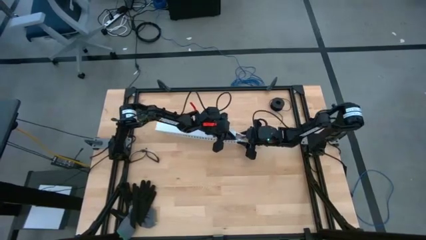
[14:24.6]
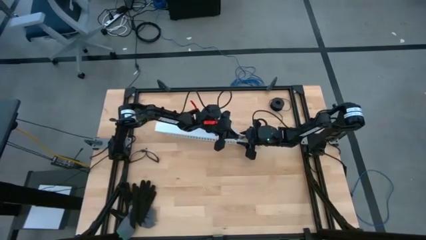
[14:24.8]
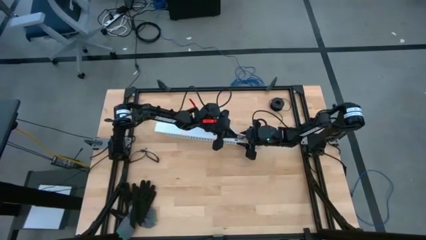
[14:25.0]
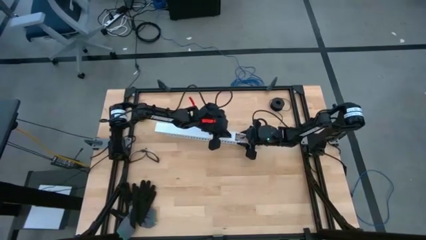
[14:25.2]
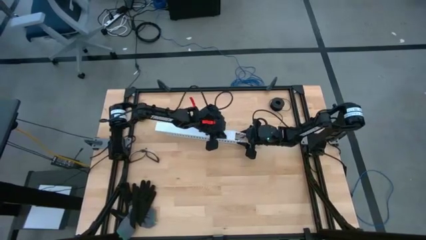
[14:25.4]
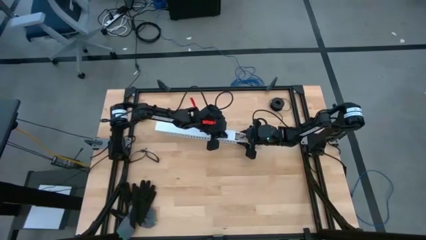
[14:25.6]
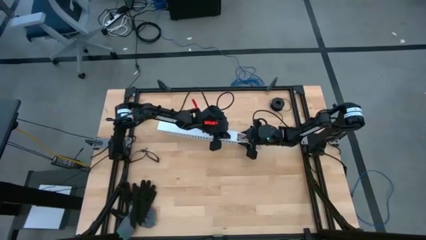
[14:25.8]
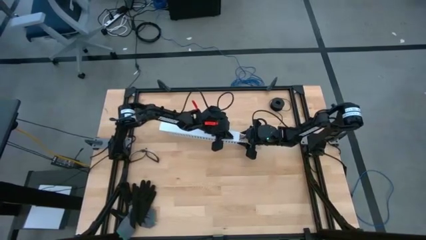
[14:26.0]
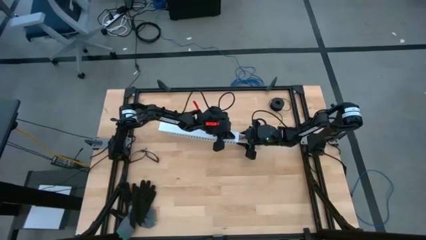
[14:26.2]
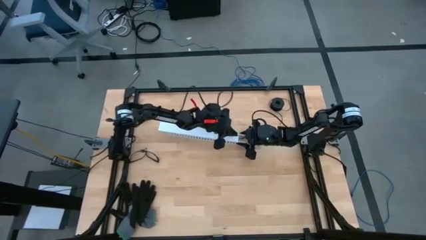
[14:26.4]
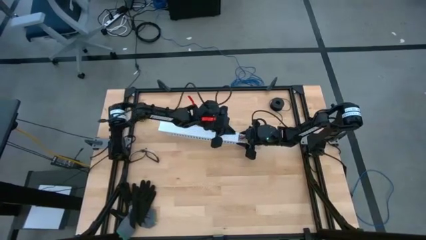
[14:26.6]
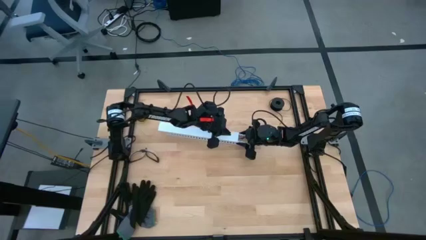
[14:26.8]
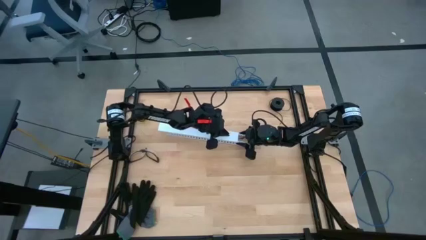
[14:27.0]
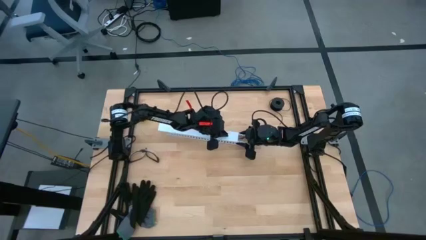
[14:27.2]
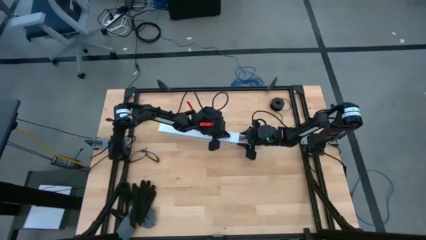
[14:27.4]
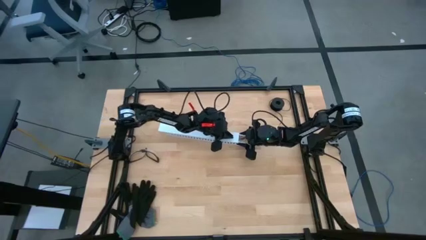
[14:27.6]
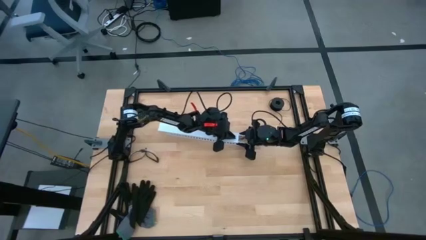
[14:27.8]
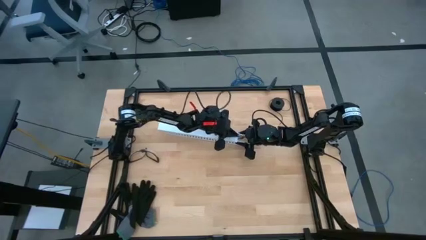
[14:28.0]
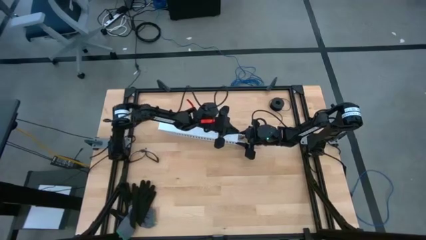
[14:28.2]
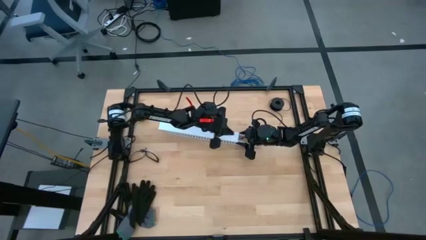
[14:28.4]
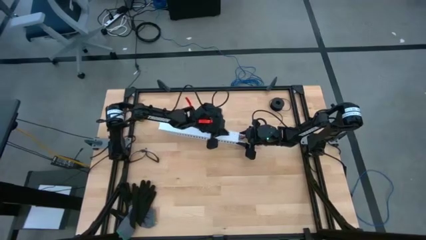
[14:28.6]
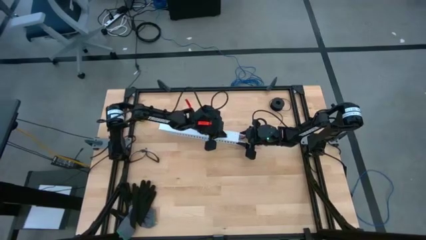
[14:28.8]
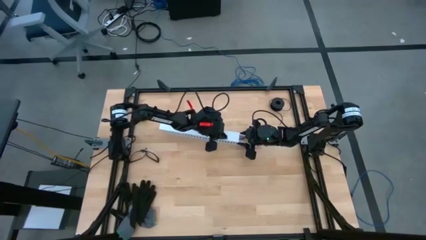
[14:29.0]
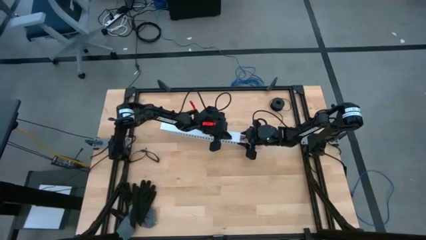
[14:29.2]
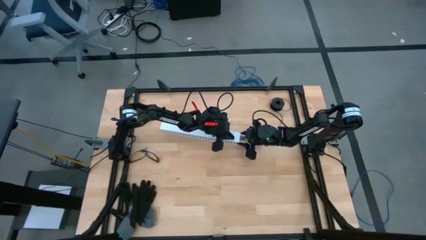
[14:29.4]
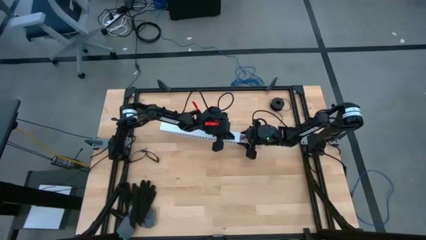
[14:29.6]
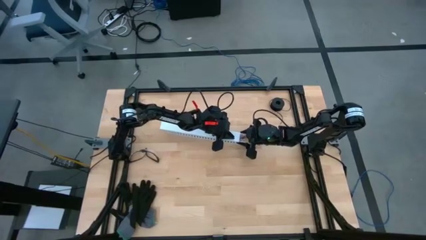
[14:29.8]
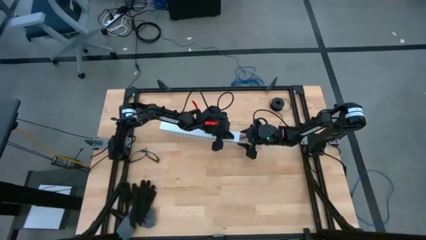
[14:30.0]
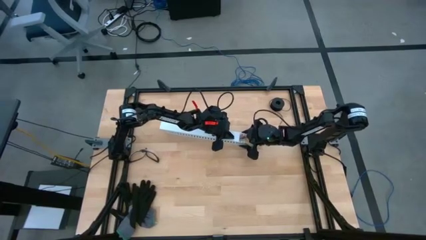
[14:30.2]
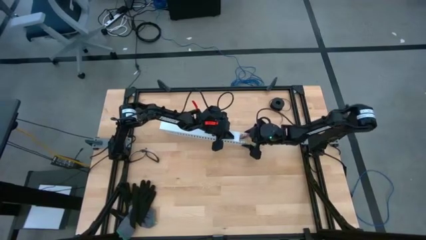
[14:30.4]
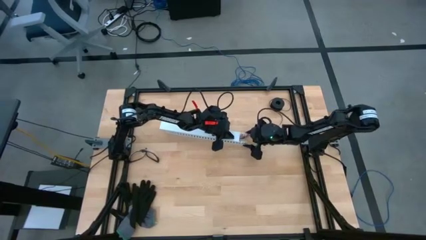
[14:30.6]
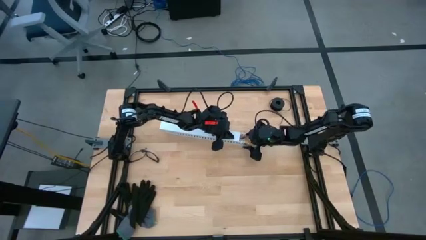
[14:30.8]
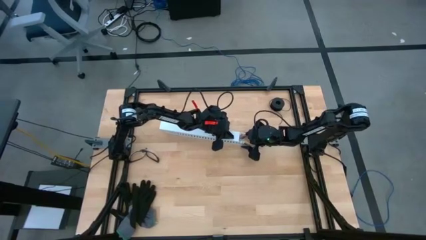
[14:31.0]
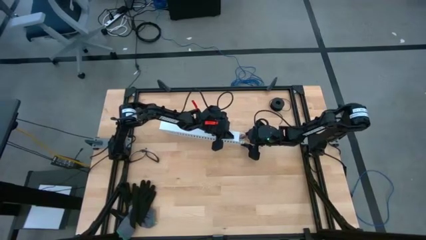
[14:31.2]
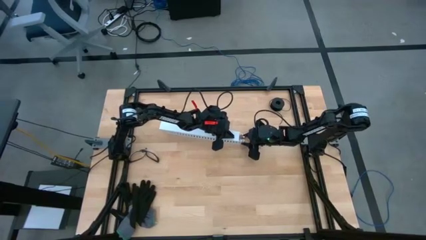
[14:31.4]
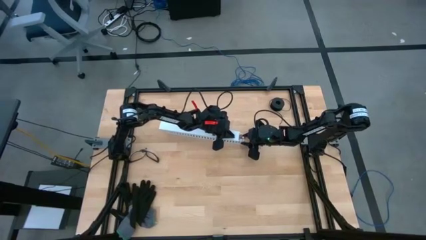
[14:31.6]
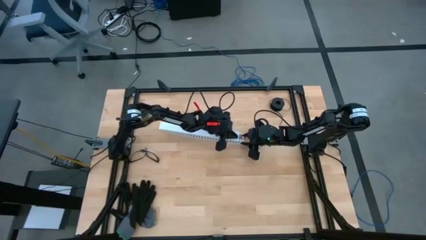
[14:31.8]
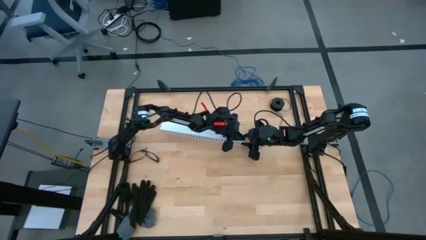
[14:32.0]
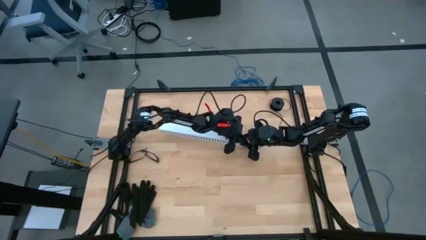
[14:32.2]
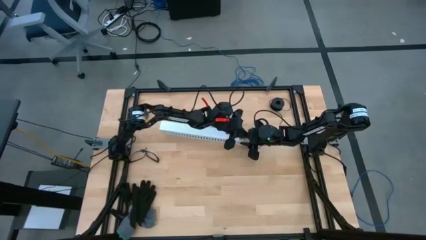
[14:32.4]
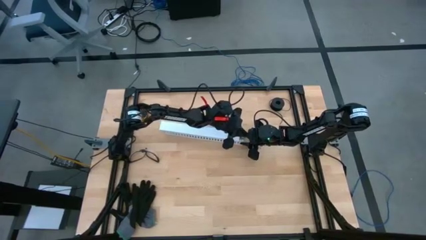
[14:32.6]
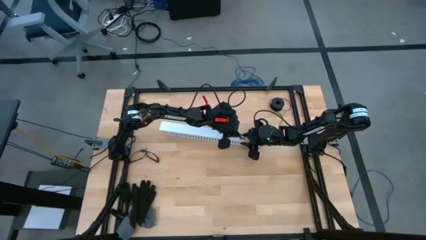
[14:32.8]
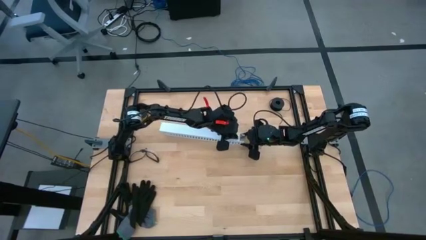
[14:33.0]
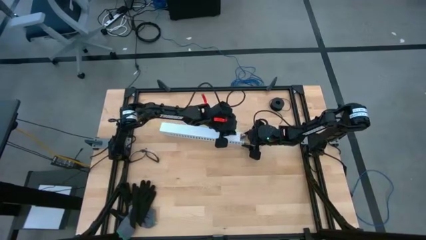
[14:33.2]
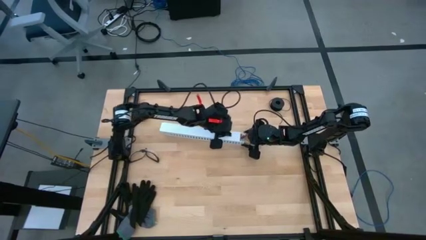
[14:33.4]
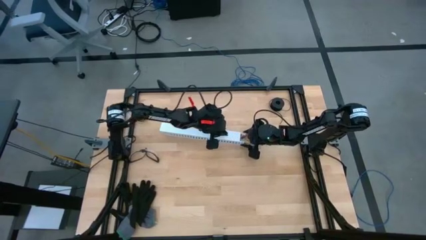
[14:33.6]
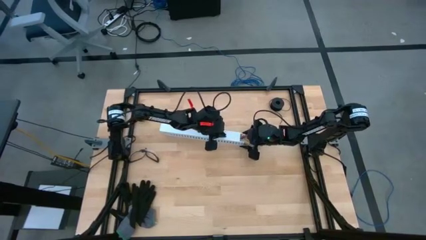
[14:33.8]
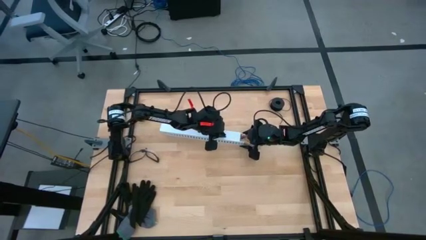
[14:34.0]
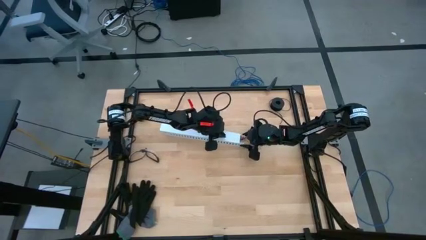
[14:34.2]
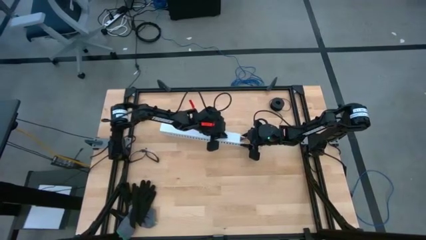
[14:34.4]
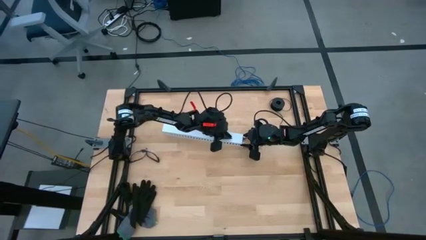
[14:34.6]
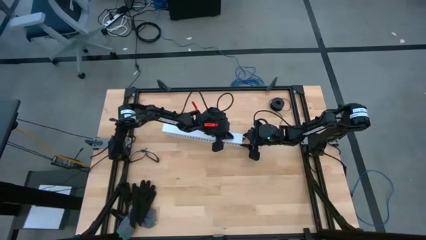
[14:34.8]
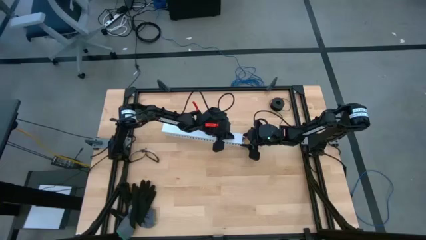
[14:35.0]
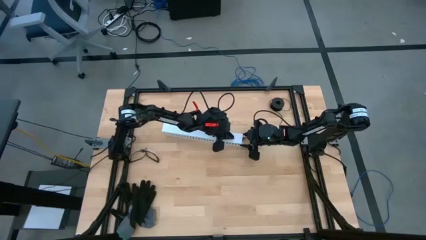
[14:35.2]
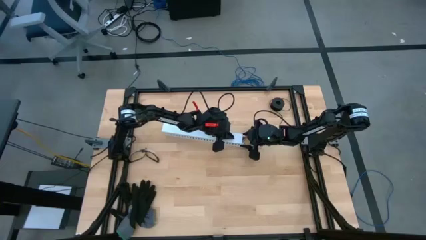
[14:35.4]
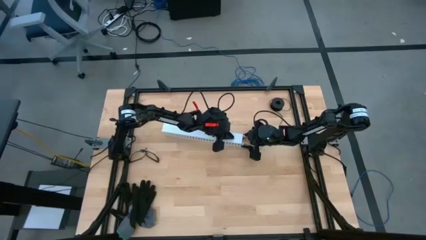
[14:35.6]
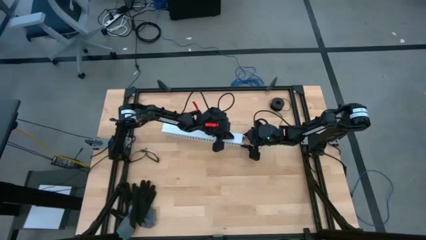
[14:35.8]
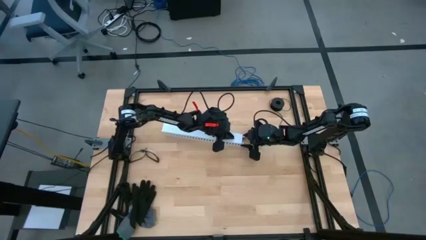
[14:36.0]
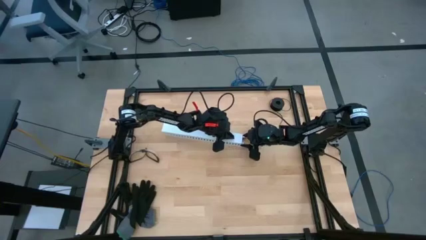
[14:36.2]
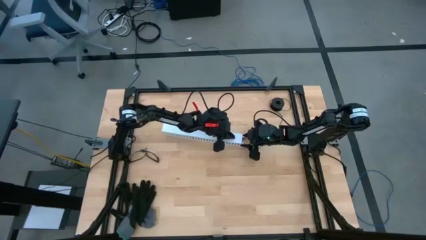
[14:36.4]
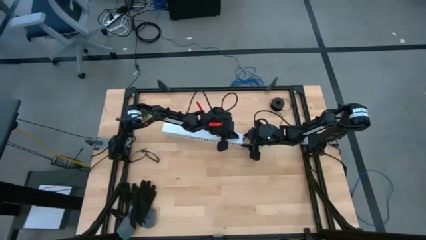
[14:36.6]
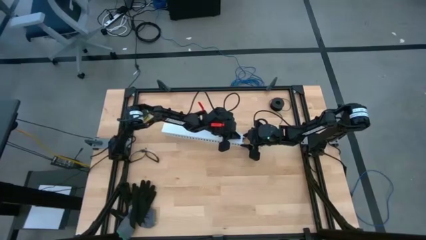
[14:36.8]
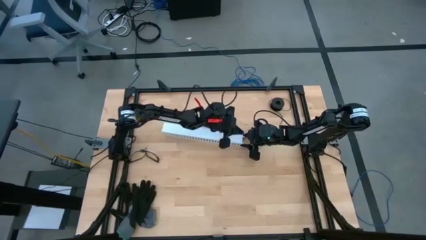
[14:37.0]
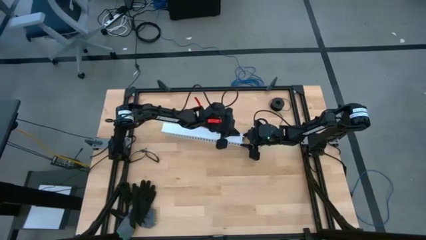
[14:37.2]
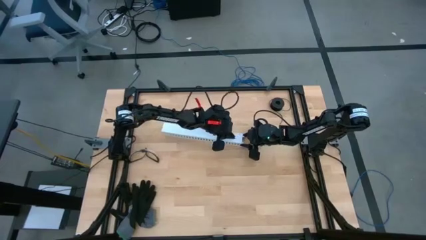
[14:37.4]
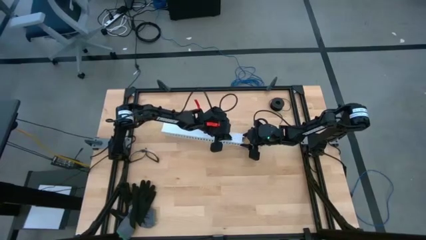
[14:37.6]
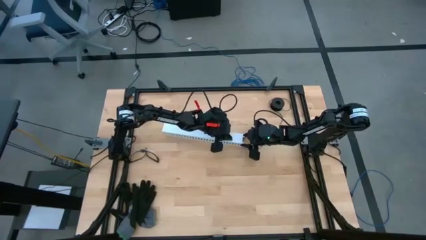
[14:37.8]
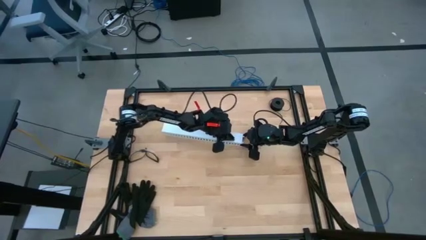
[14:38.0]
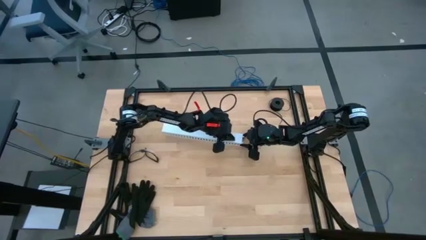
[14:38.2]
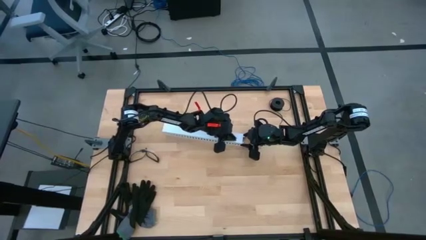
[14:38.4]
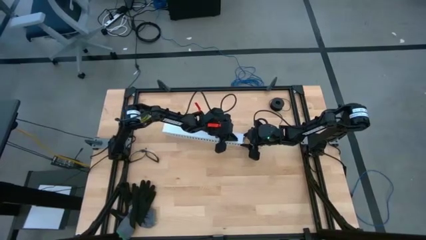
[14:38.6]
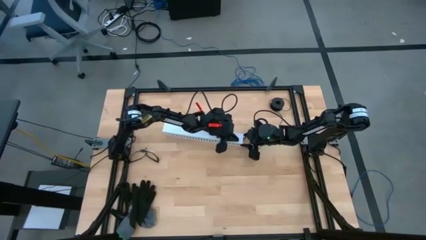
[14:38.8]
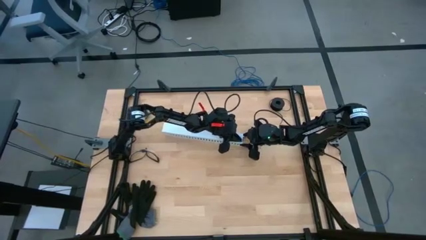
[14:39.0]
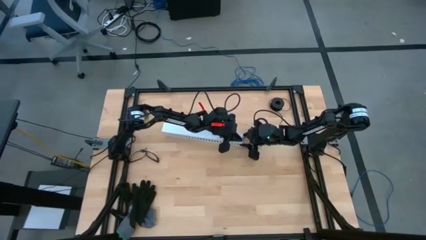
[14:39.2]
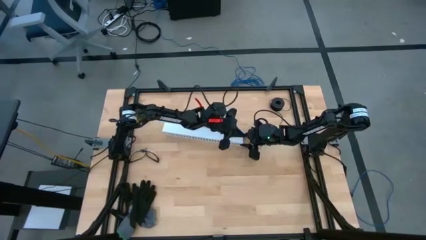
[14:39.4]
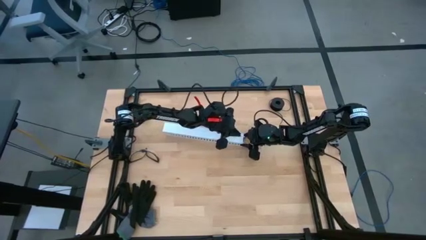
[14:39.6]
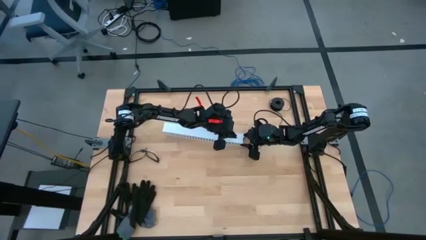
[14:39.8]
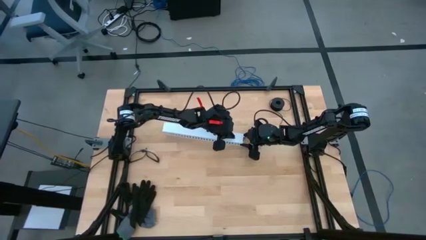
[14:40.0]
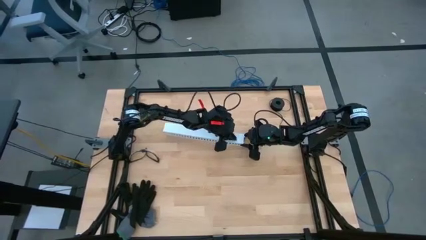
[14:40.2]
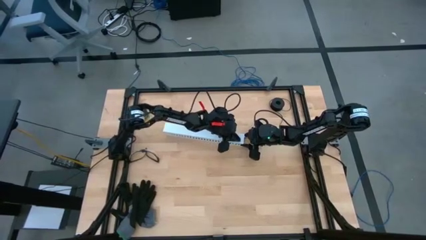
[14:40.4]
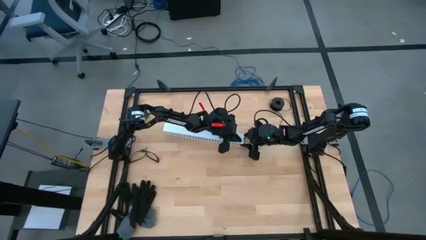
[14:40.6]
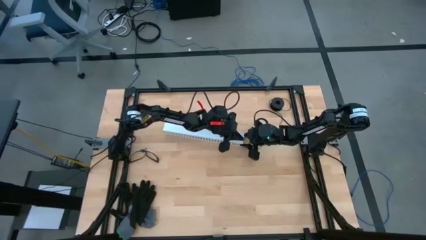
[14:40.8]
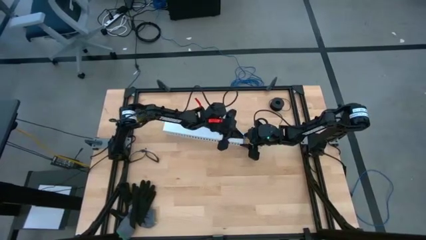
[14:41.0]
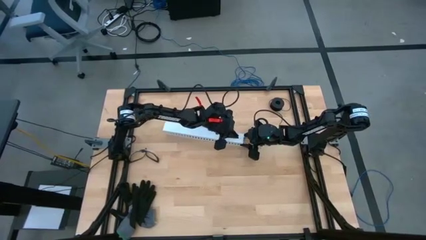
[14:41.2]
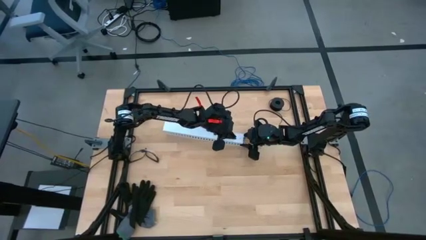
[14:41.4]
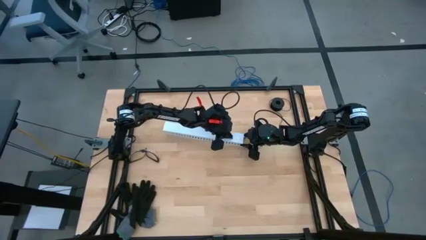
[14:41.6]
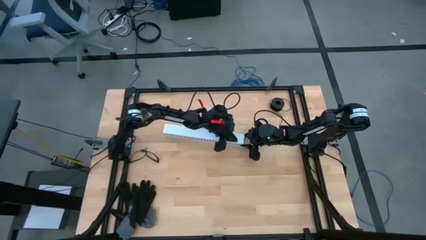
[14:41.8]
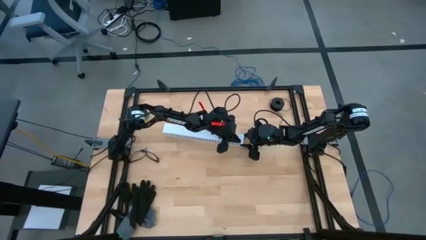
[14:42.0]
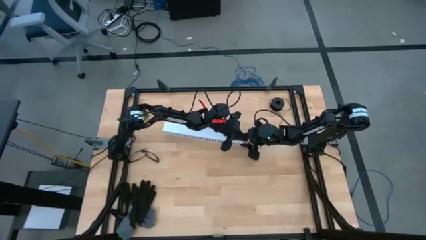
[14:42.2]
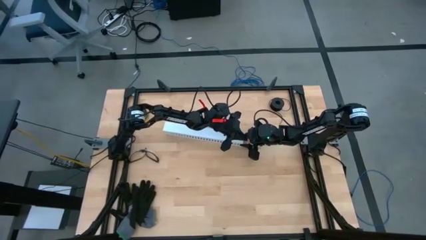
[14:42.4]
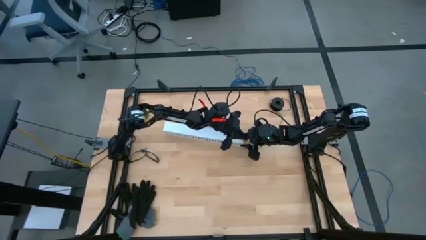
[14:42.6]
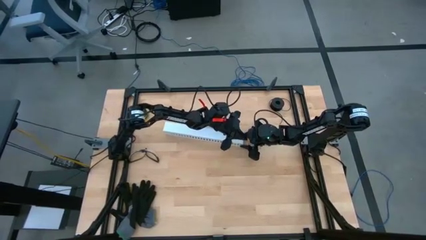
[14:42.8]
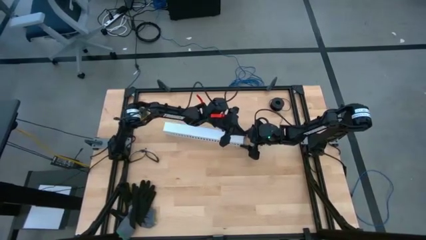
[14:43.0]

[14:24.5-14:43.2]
Task: Ziptie cables
Close the white cable duct
